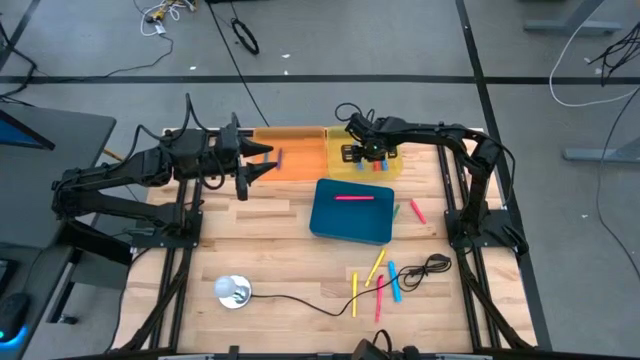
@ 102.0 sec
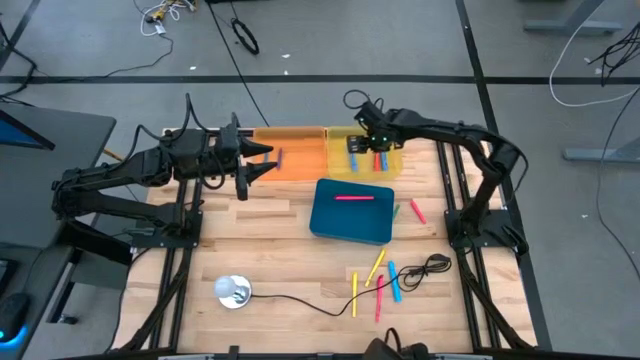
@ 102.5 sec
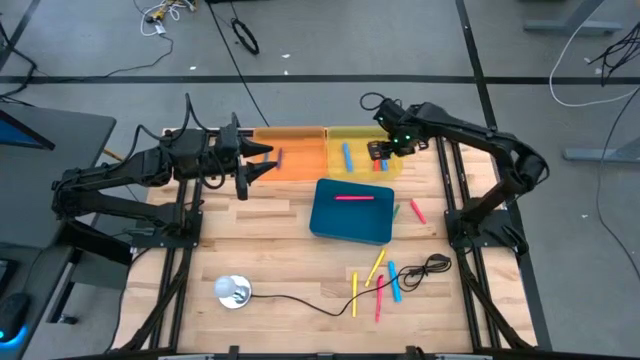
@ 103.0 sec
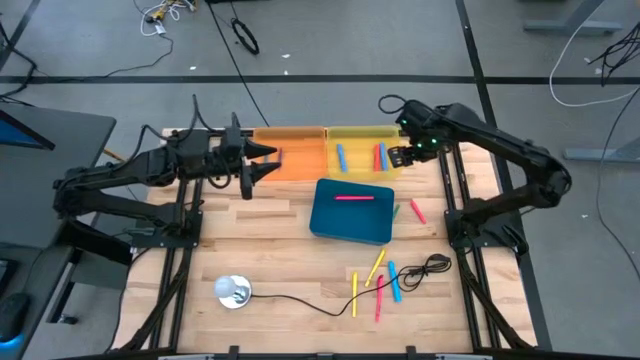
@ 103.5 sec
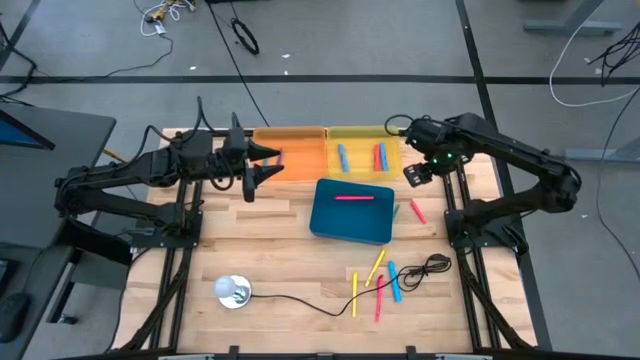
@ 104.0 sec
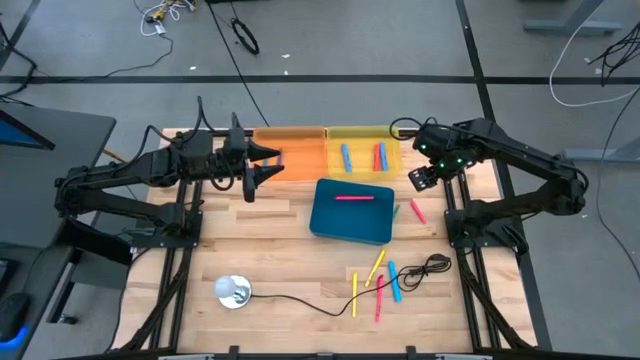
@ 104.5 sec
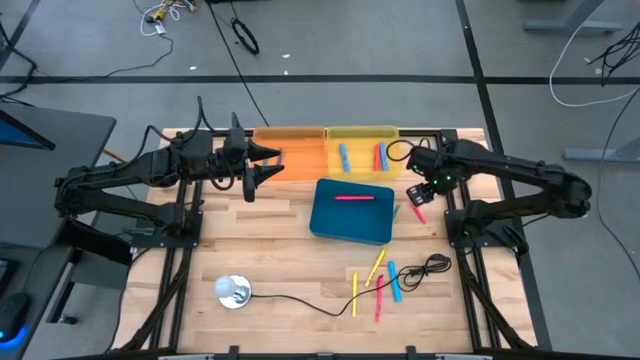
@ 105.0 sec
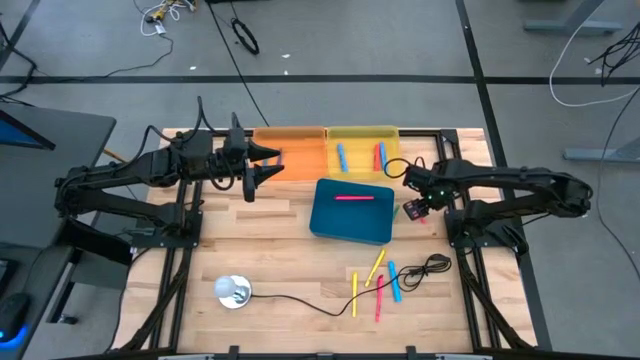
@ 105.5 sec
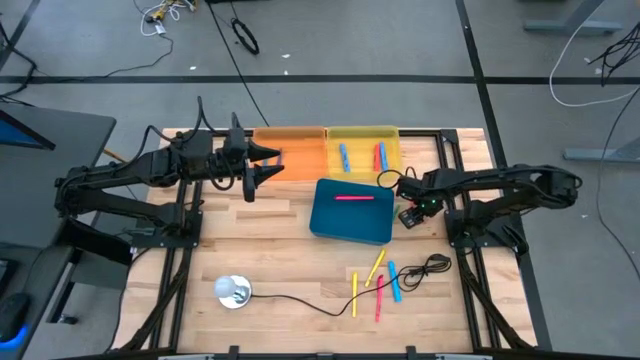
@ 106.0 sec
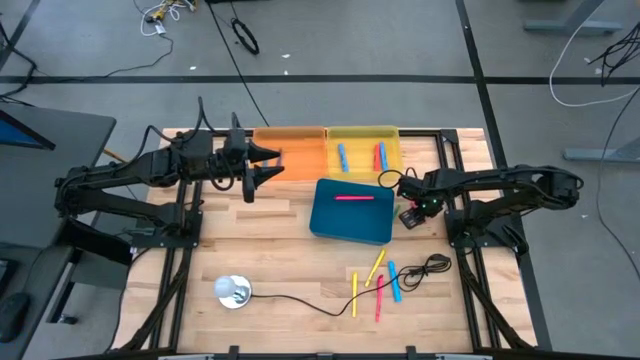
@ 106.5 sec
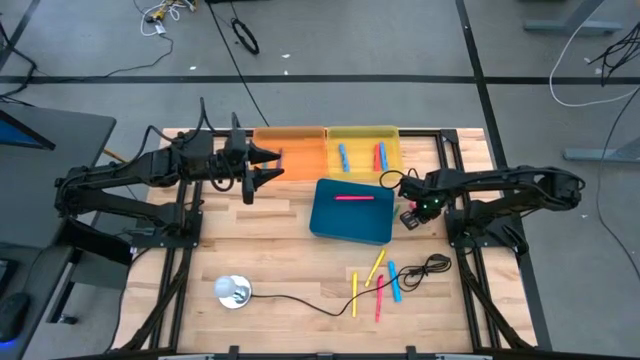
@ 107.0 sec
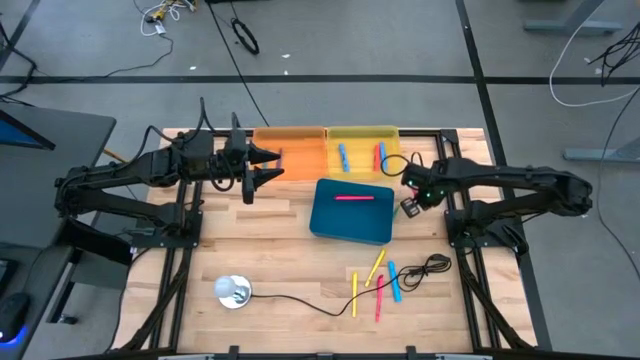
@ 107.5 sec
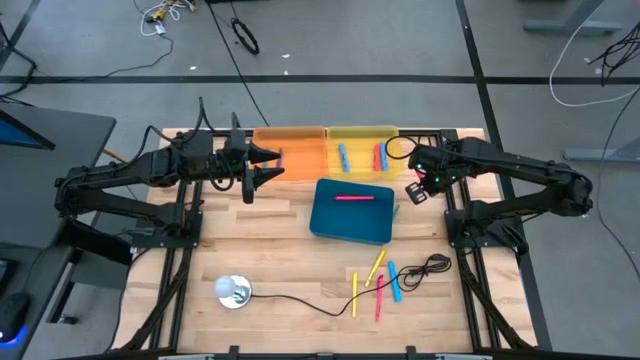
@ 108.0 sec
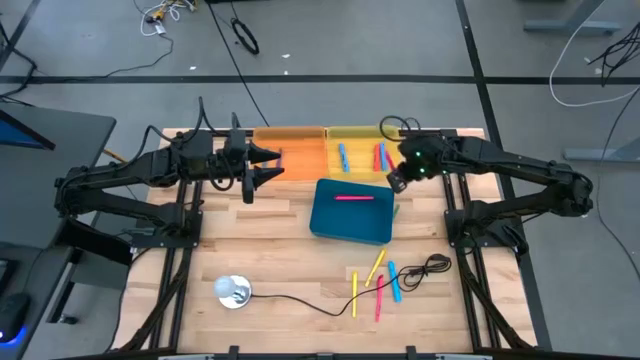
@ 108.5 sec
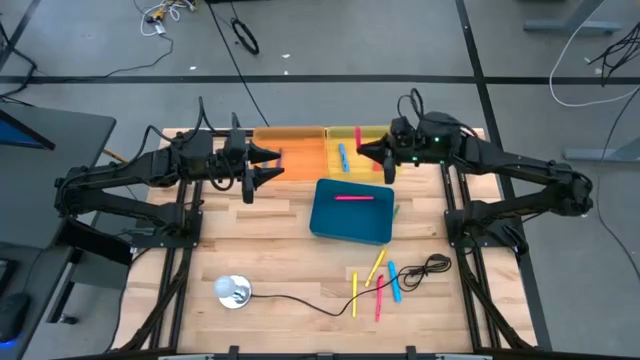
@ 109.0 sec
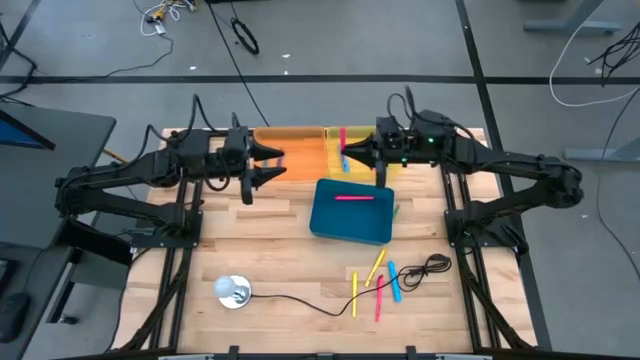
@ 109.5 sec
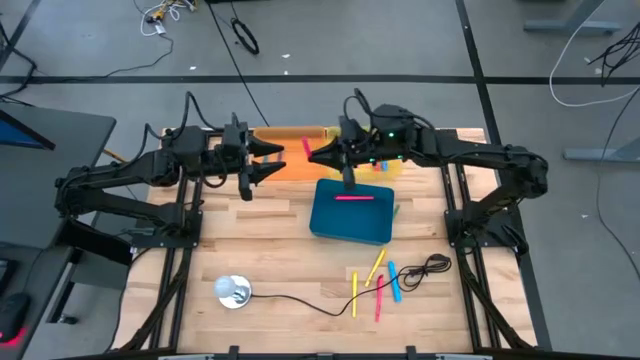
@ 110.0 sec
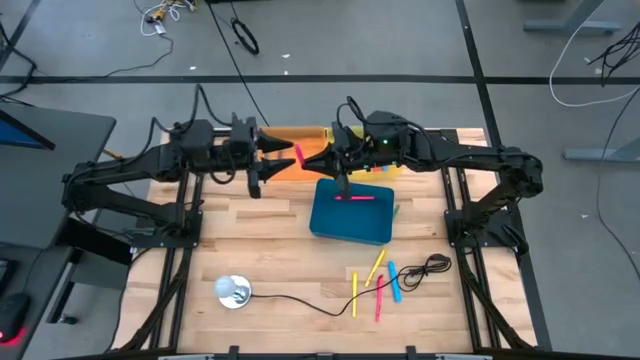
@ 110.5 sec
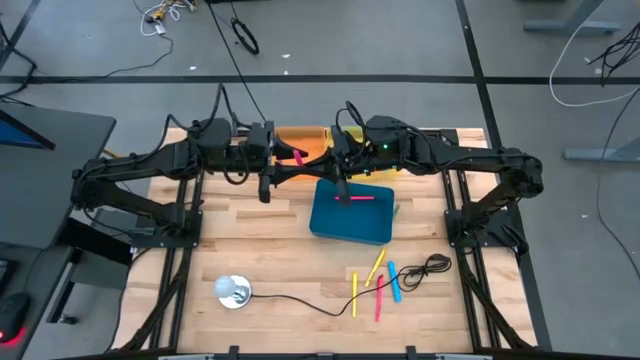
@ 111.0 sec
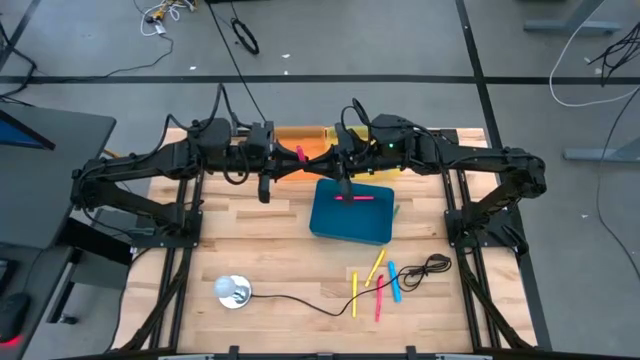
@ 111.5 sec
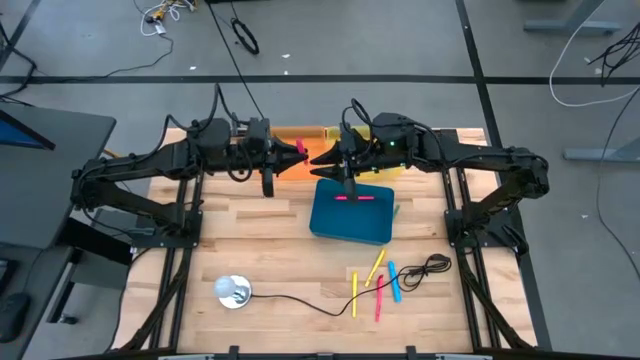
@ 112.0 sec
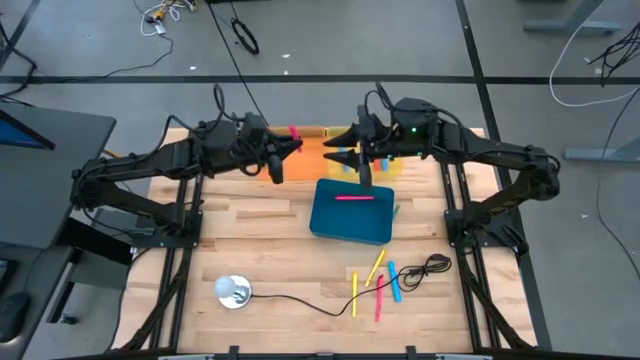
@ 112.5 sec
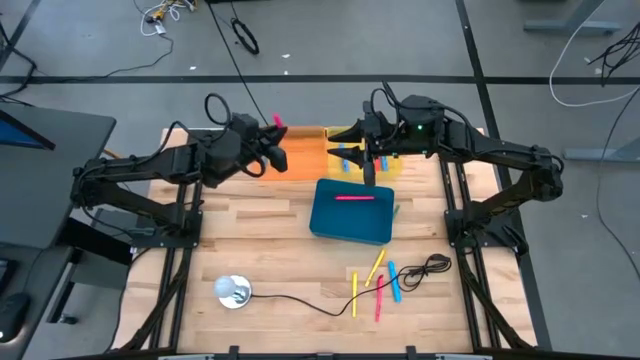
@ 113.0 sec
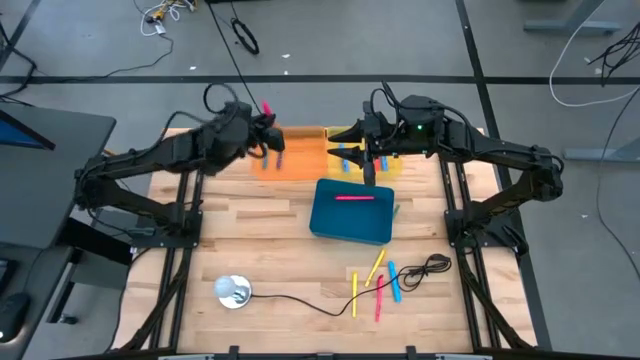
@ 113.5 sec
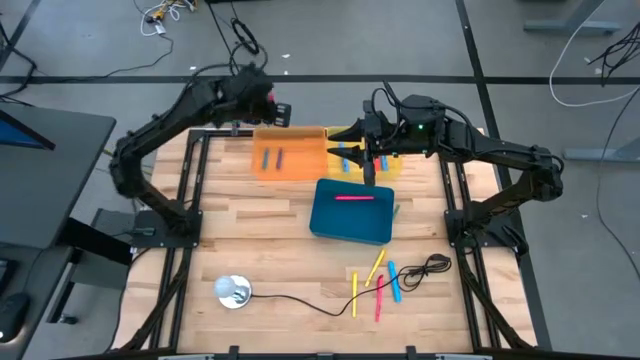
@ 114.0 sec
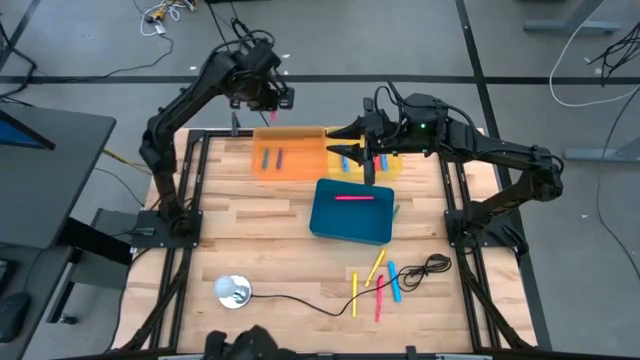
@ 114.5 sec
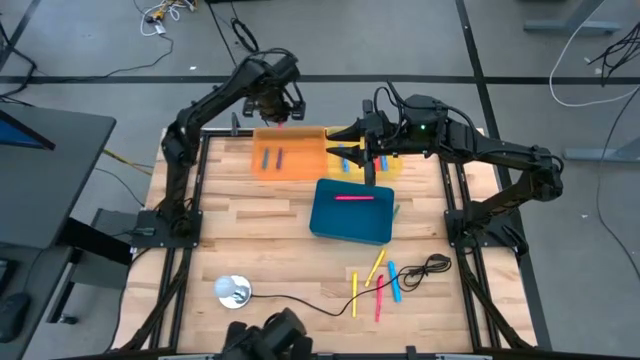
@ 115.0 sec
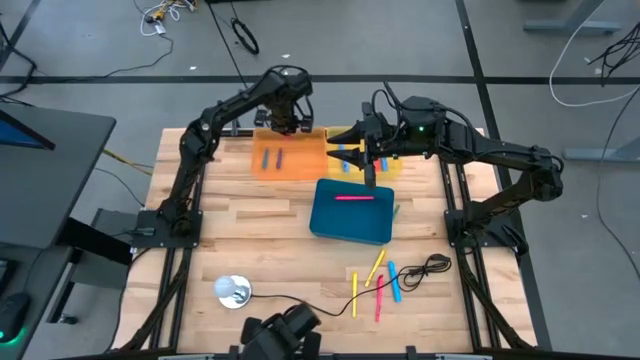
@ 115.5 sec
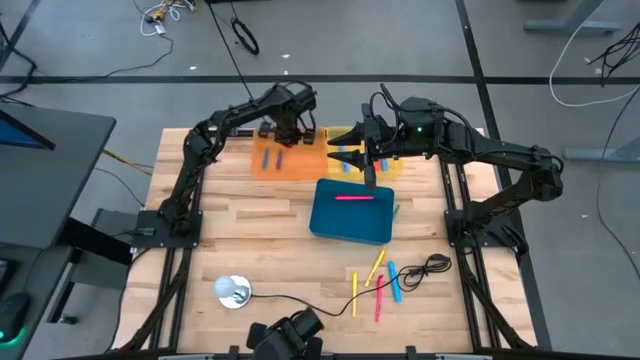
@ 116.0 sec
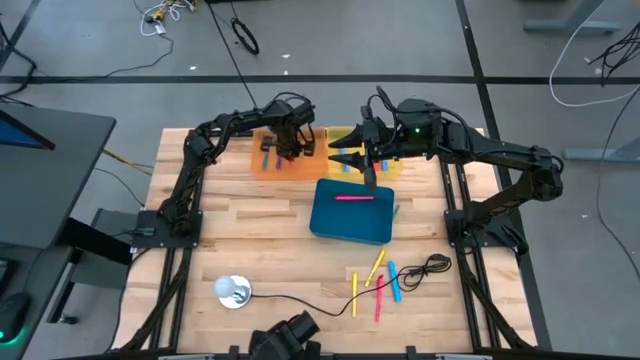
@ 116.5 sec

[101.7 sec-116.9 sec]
Task: Pick & Place Markers
Put the small pink highlighter into the orange transparent bin

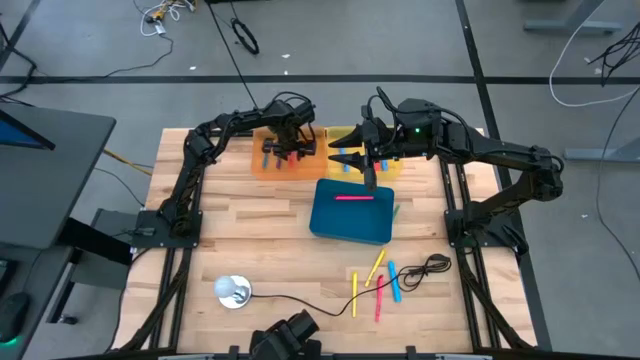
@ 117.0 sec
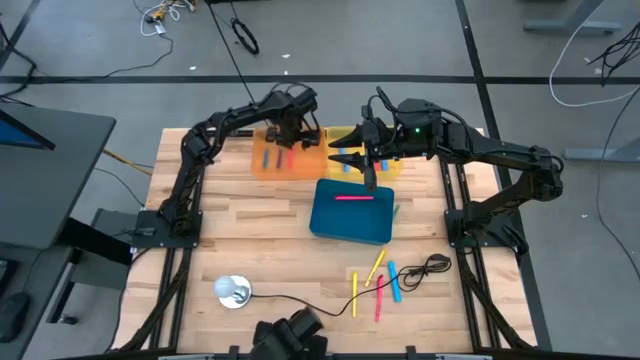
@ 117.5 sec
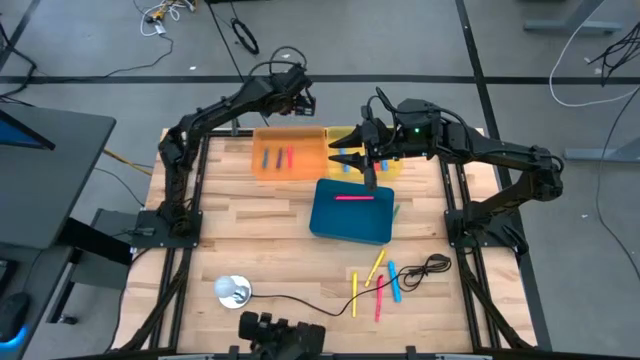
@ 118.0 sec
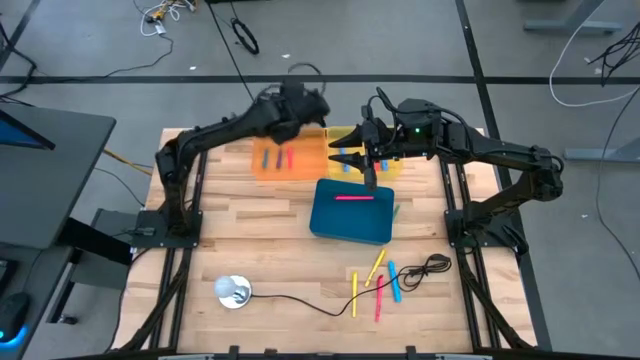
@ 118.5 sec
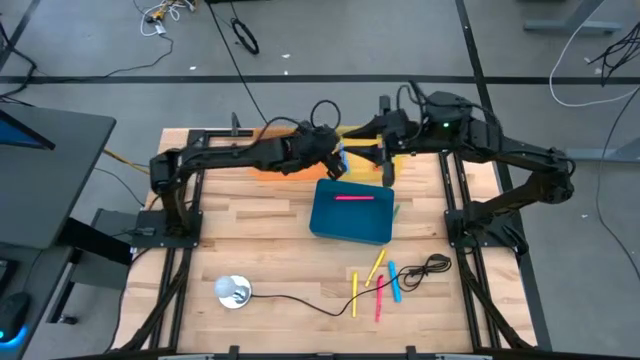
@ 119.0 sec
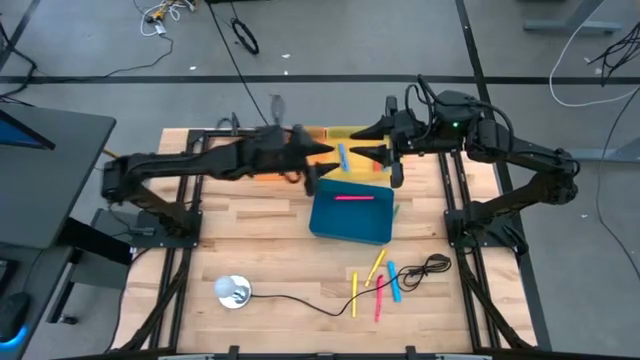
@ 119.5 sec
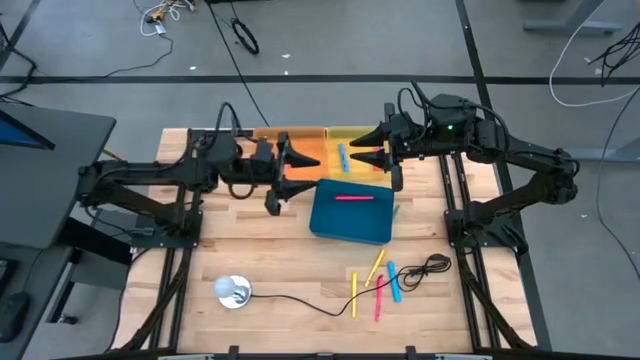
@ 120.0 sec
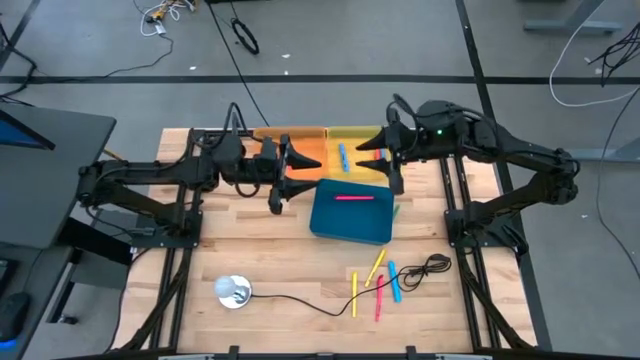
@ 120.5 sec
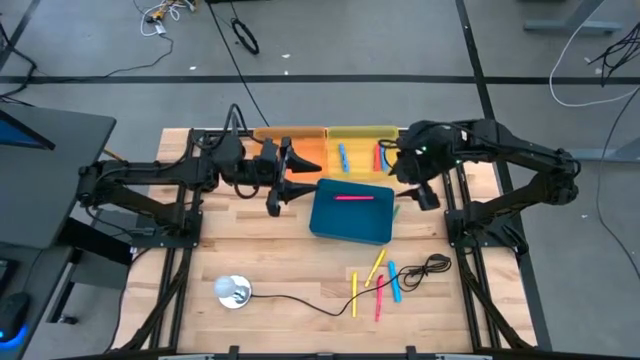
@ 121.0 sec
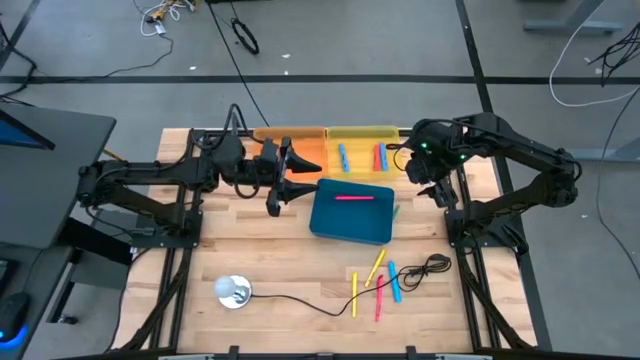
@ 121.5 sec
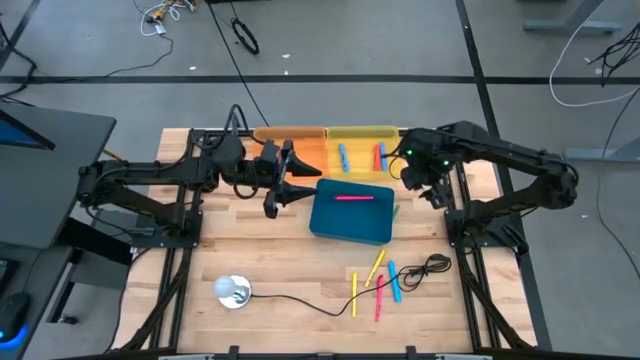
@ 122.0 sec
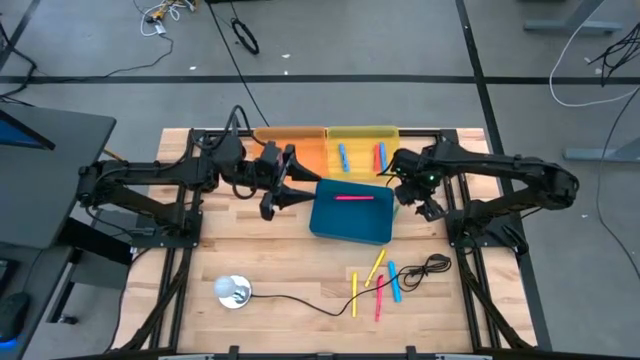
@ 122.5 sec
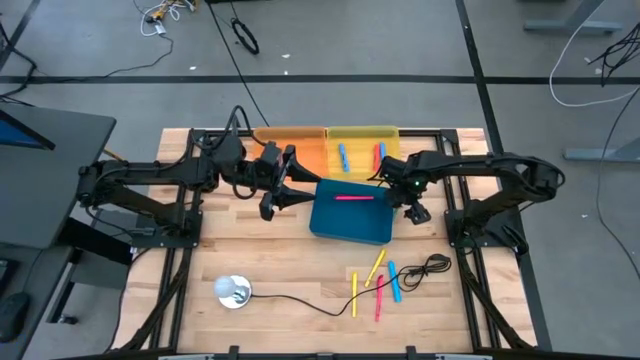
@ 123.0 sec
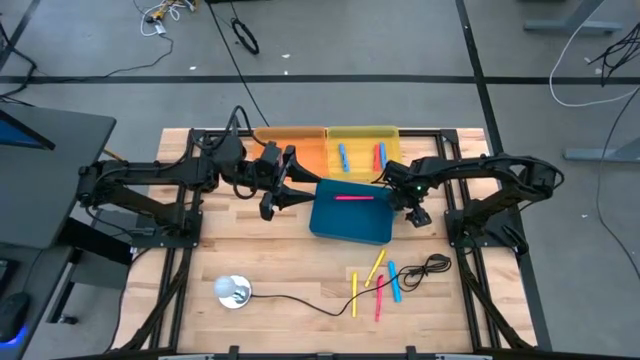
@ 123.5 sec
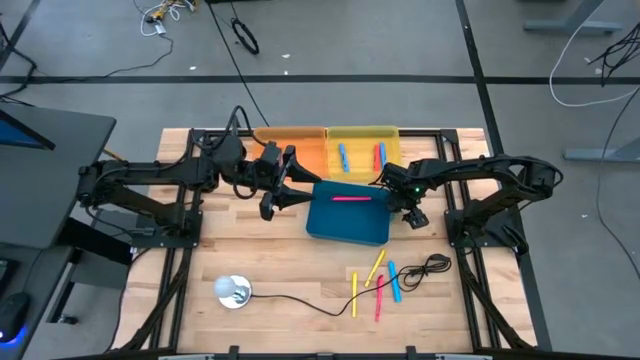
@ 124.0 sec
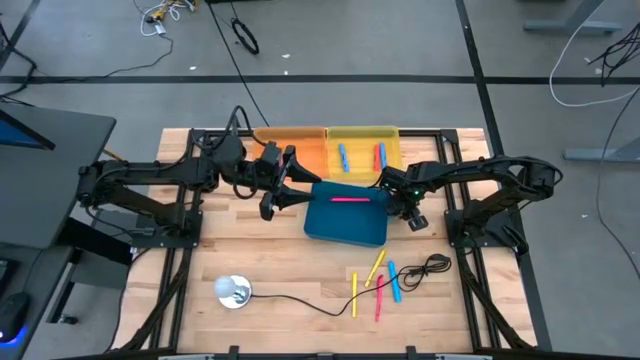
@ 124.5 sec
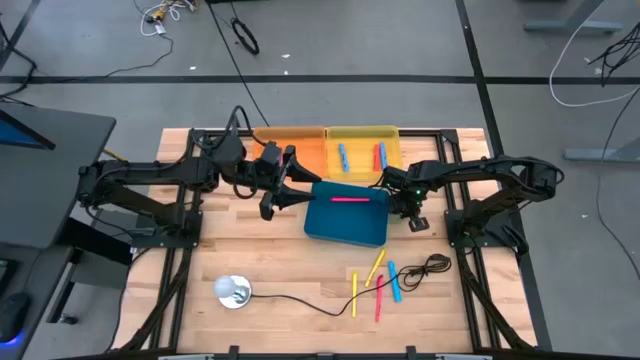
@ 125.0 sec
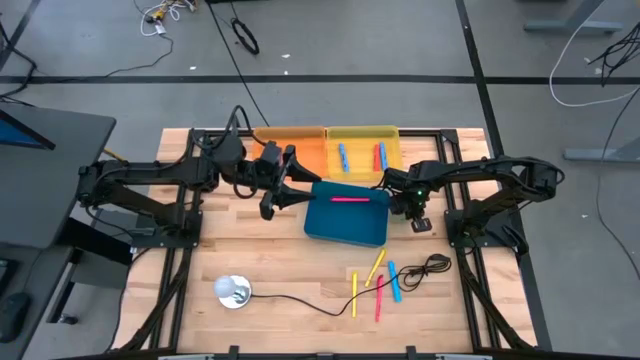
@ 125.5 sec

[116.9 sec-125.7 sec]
Put the small green highlighter into the orange transparent bin
